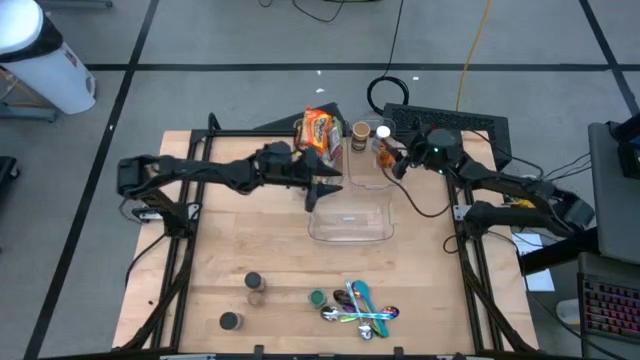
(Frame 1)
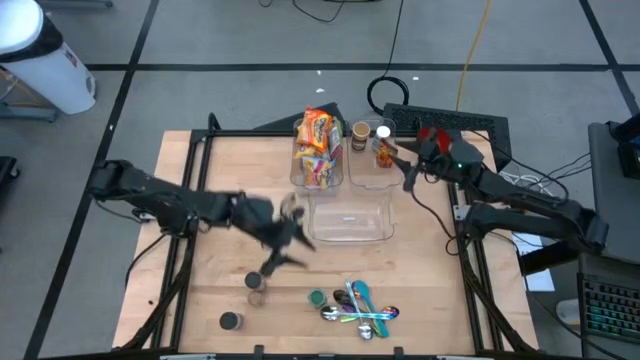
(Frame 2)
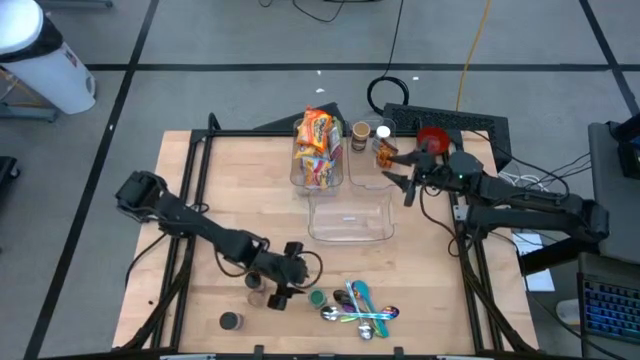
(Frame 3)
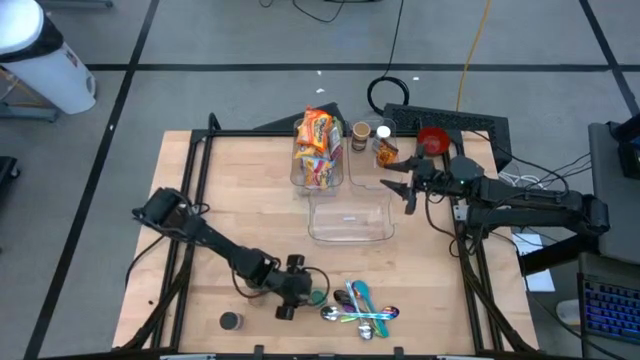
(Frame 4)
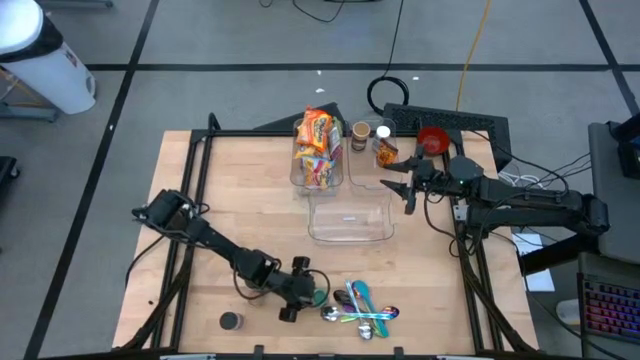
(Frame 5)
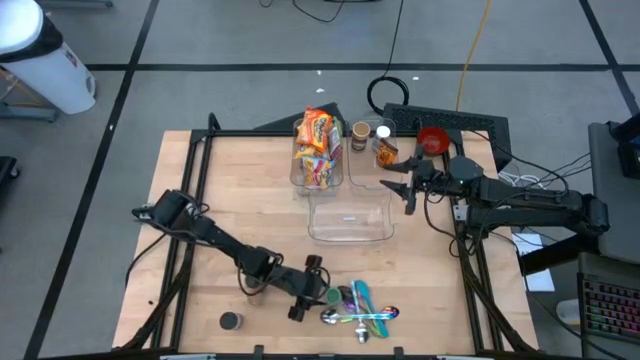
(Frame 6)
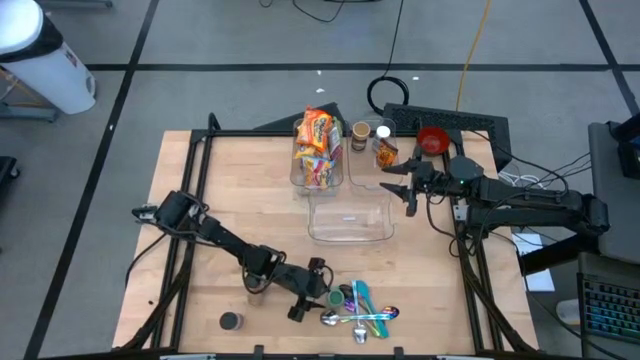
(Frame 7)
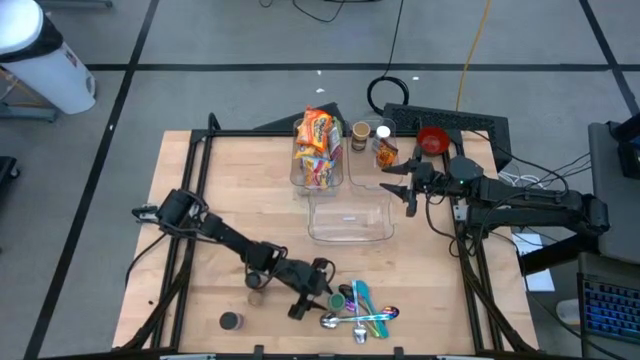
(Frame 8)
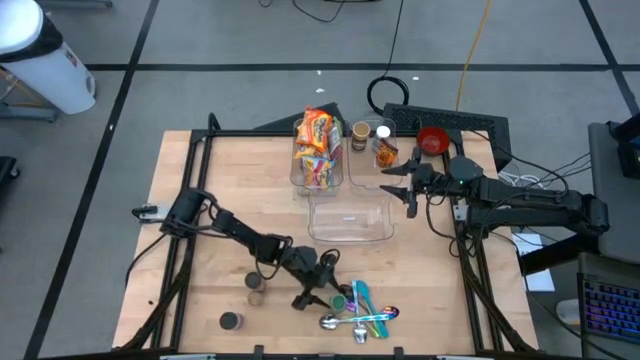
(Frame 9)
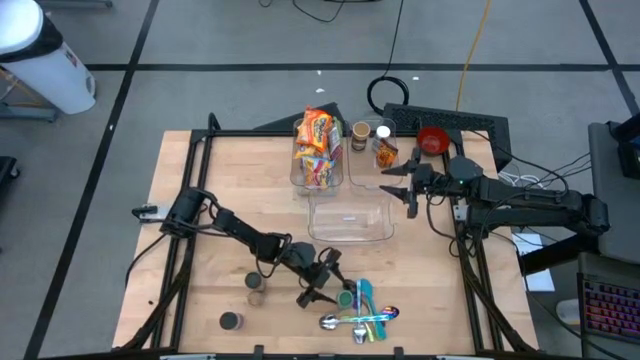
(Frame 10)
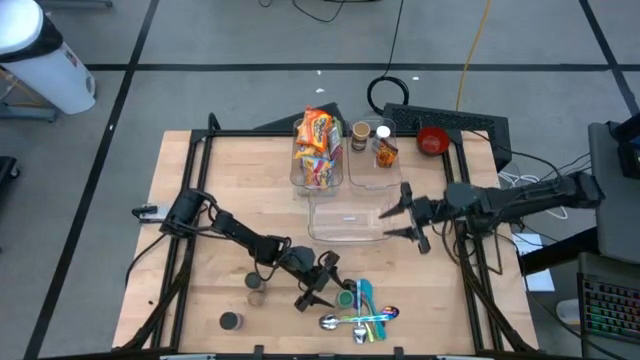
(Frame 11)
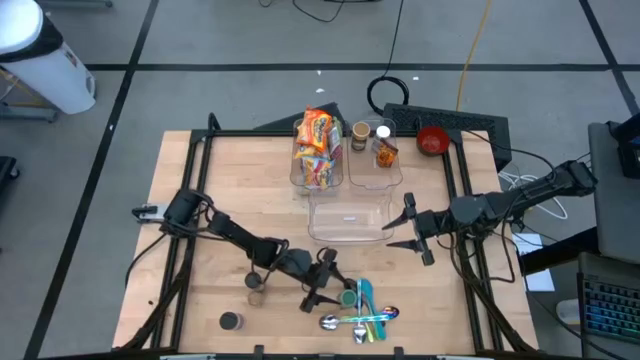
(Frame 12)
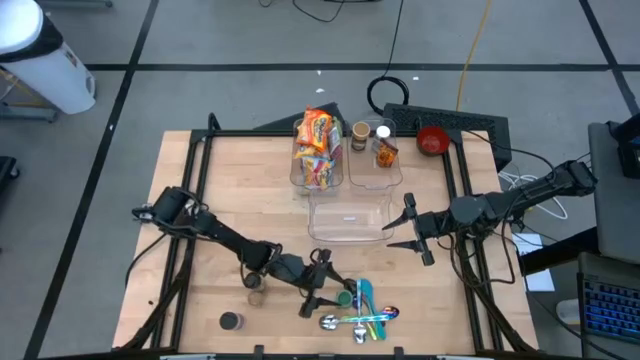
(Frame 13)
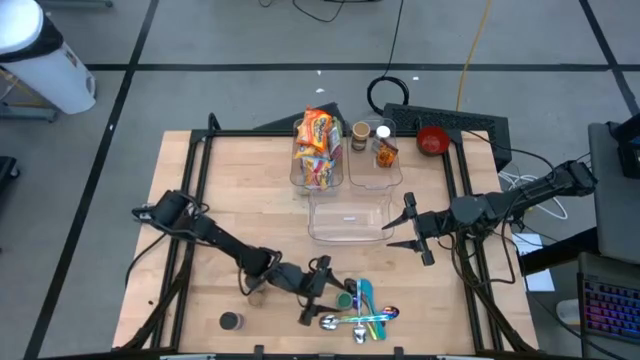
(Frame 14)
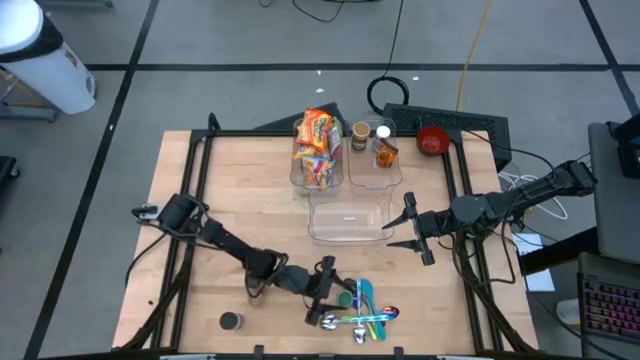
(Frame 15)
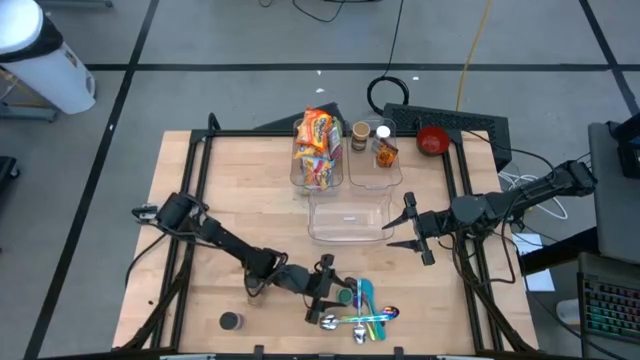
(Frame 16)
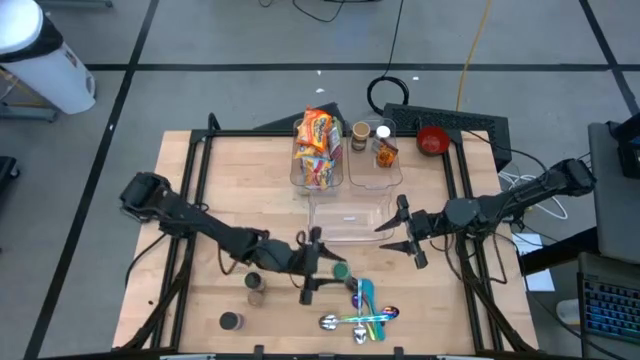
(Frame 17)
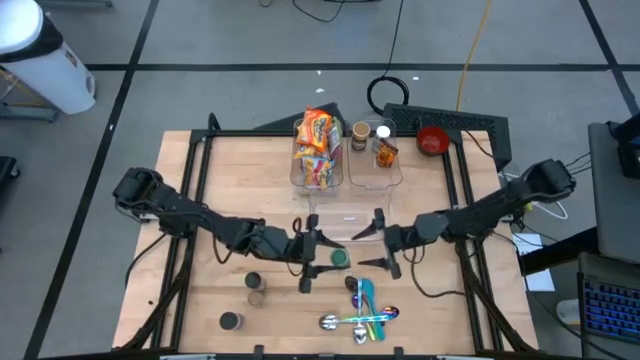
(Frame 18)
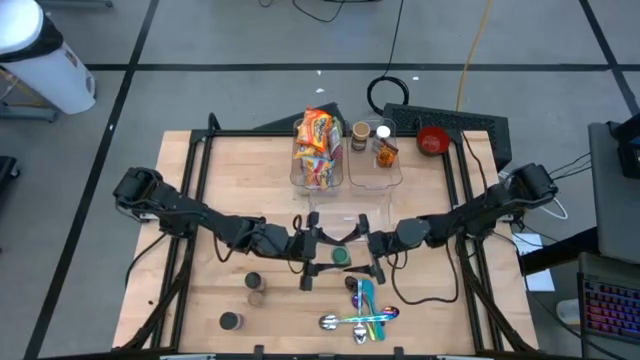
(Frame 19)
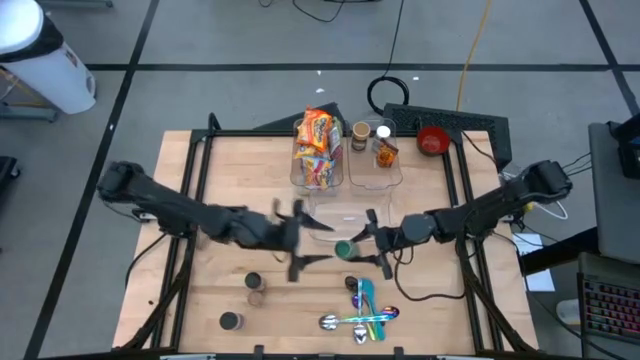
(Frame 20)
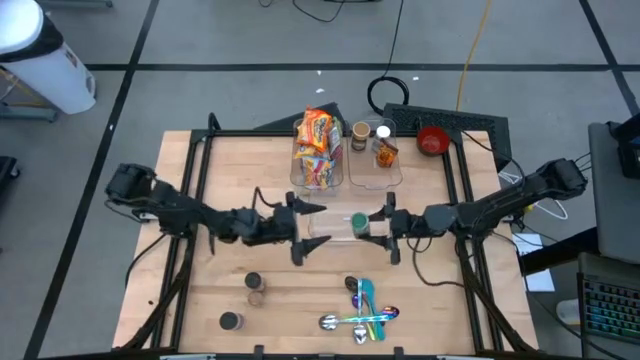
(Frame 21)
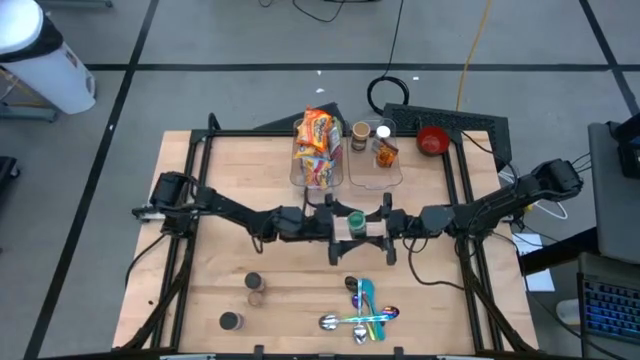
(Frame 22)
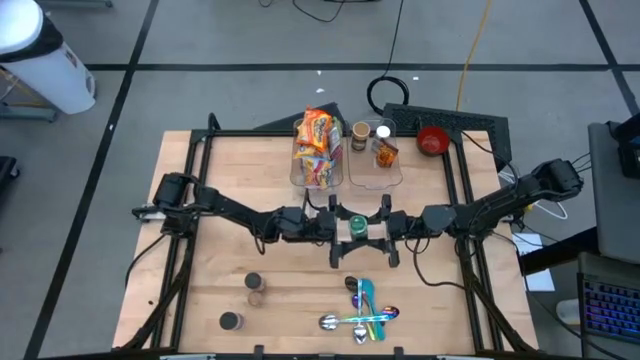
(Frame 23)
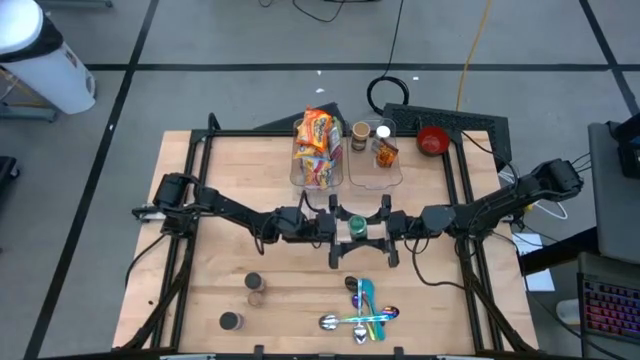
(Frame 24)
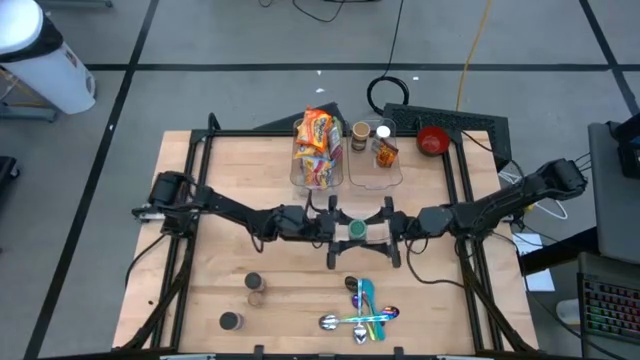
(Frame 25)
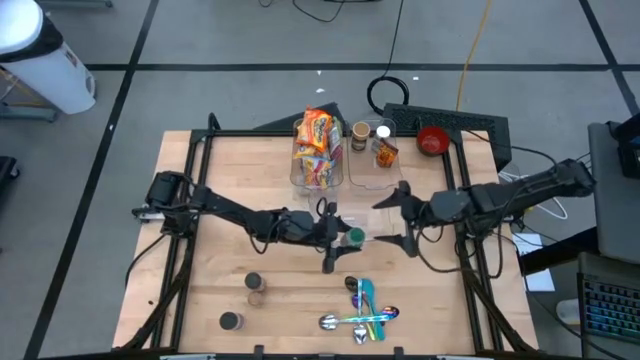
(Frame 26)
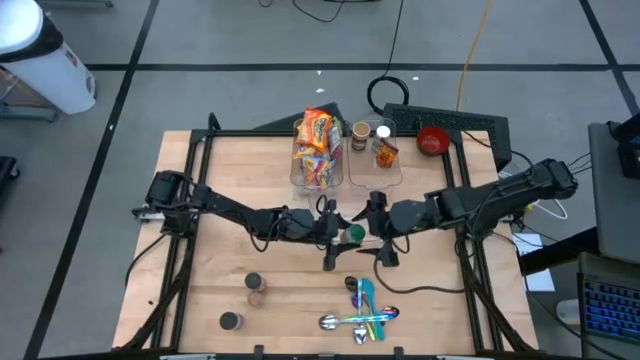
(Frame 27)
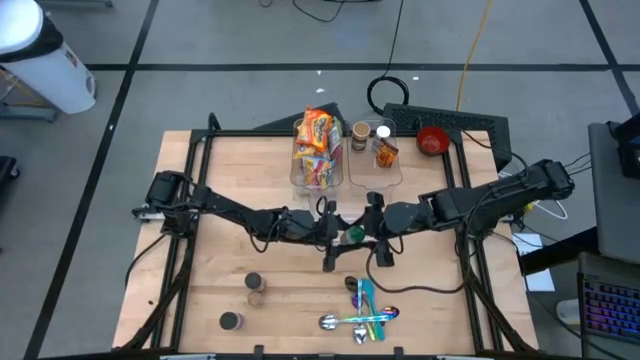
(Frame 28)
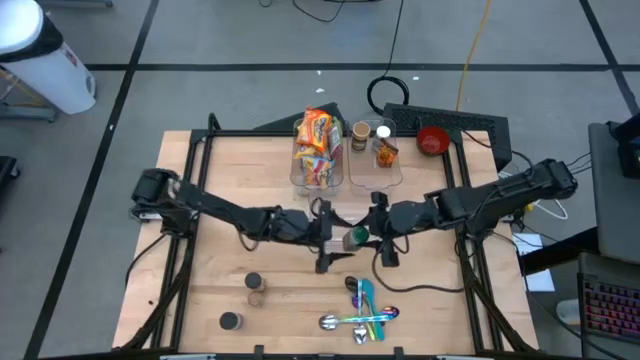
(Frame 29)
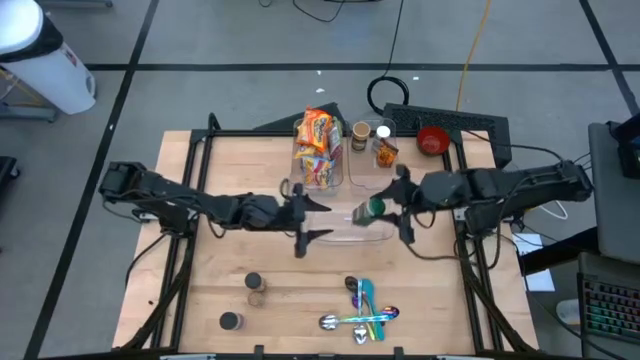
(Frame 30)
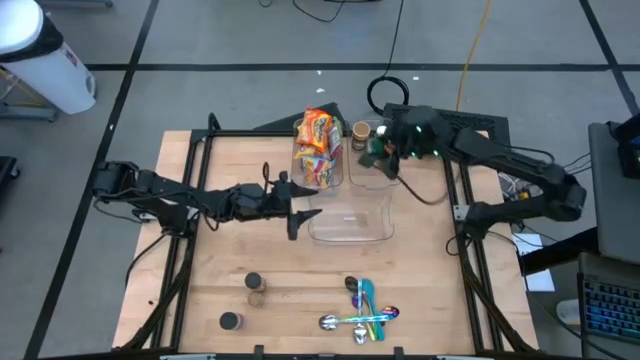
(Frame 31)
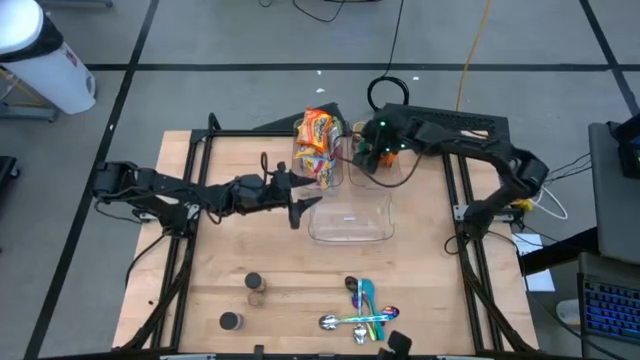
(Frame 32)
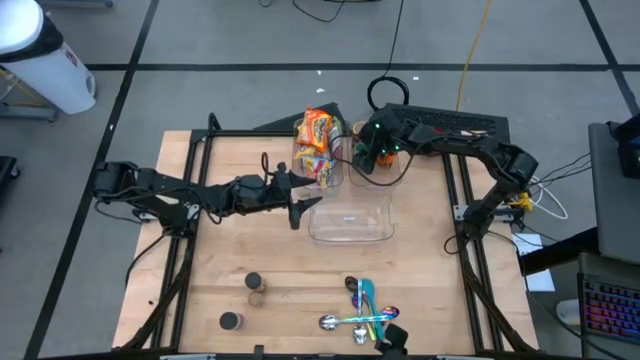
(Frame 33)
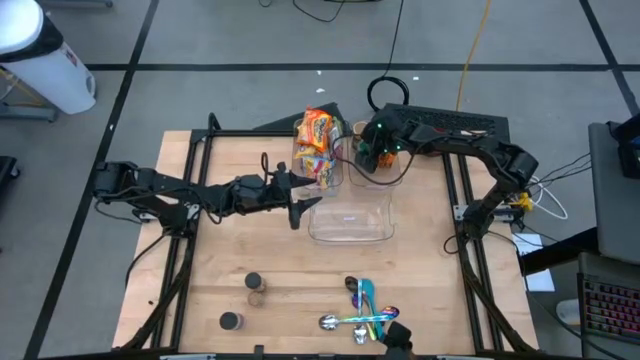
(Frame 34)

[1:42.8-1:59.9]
Task: Pick & Place Food Item
Put the green seasoning bottle into the right transparent bin

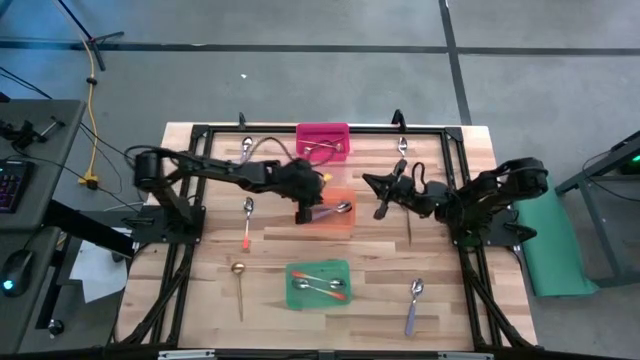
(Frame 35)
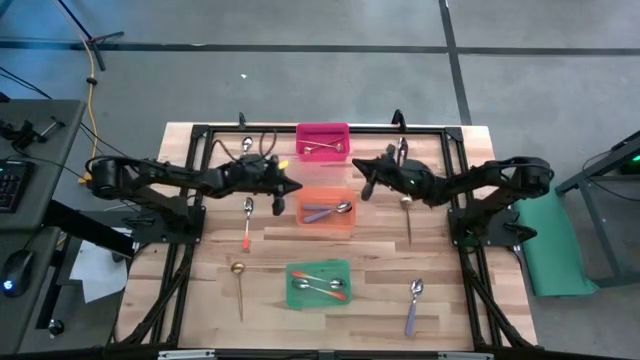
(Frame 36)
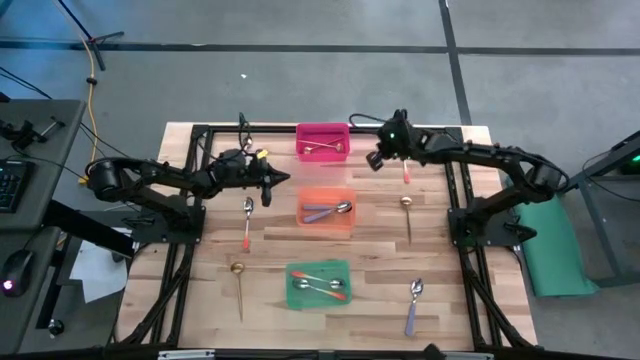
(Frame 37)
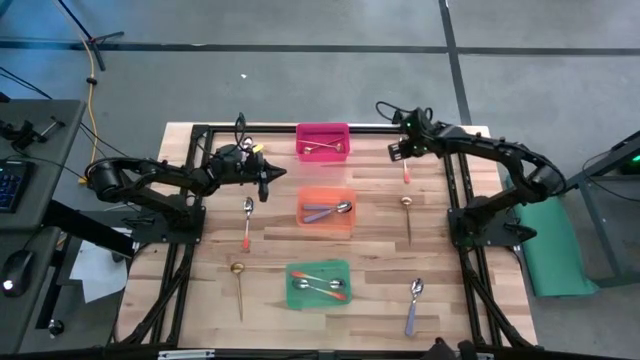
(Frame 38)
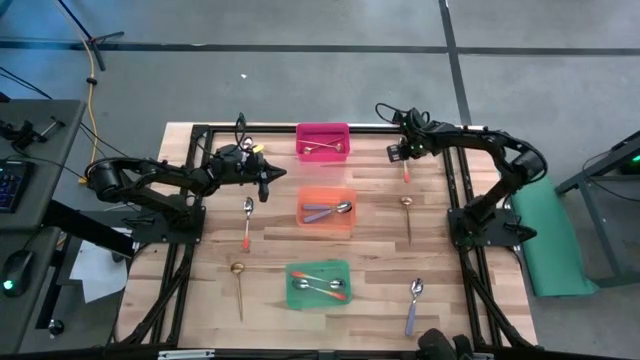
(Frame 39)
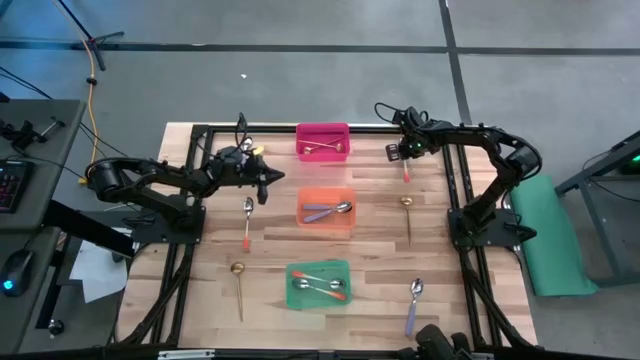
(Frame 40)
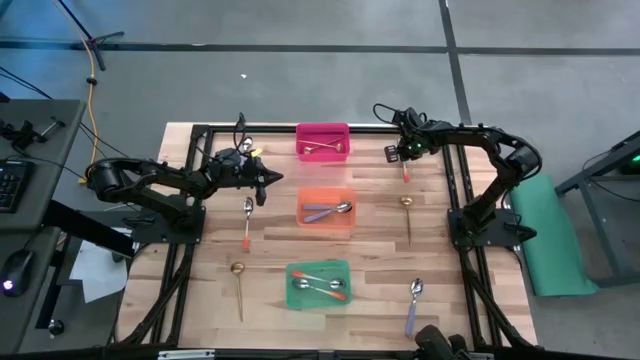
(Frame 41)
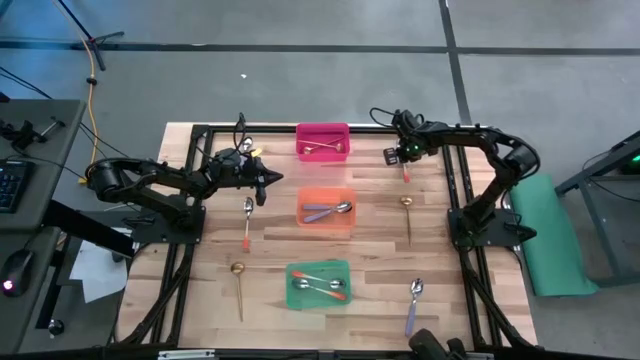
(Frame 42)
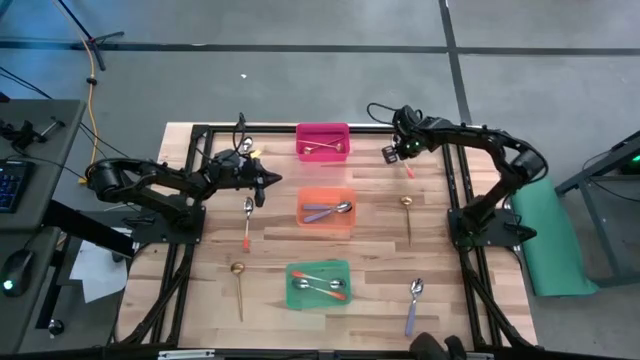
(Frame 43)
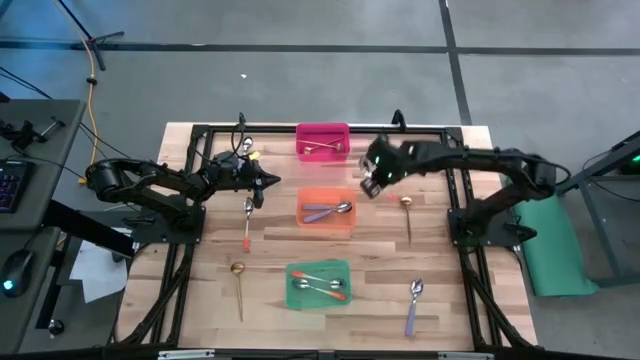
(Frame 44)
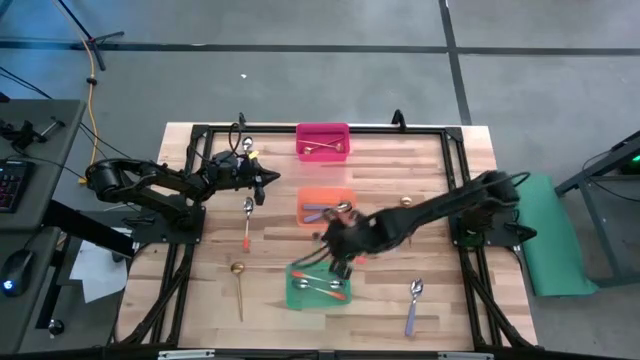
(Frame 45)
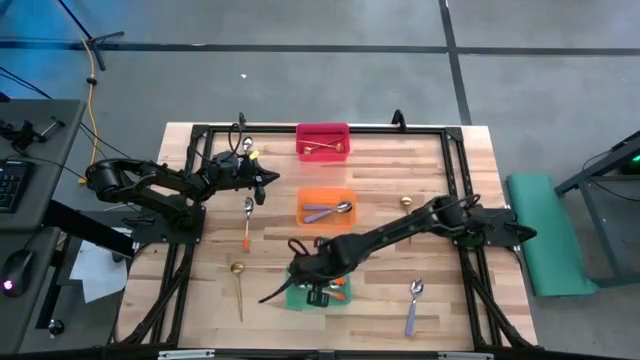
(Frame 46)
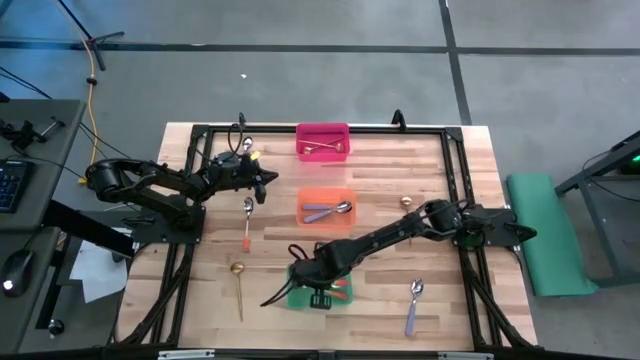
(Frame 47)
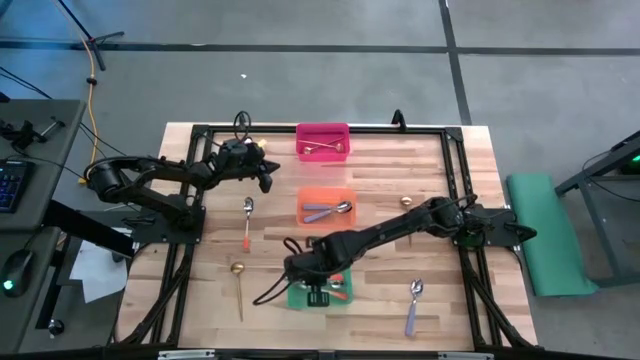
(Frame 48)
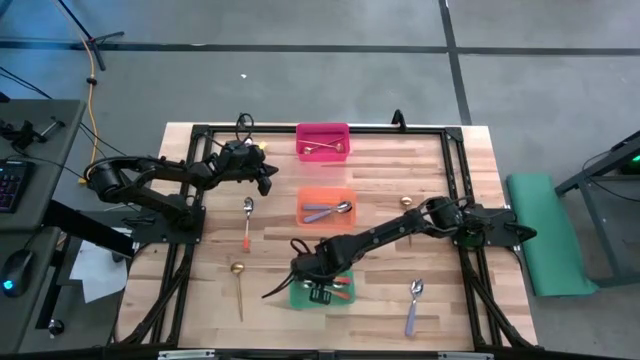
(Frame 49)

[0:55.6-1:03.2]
Task: Sort silverware by color (type)
Put the top orange spoon into the green bin
